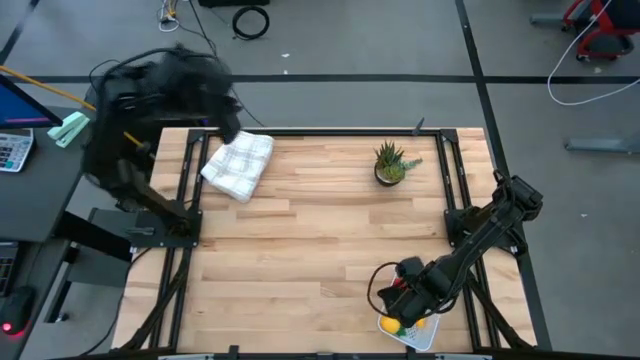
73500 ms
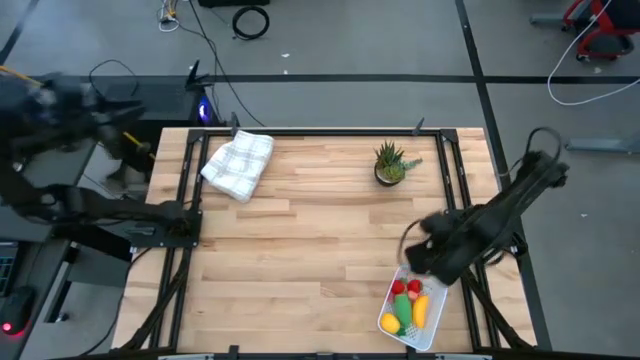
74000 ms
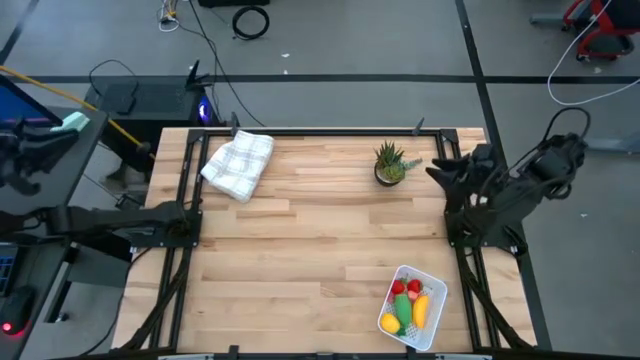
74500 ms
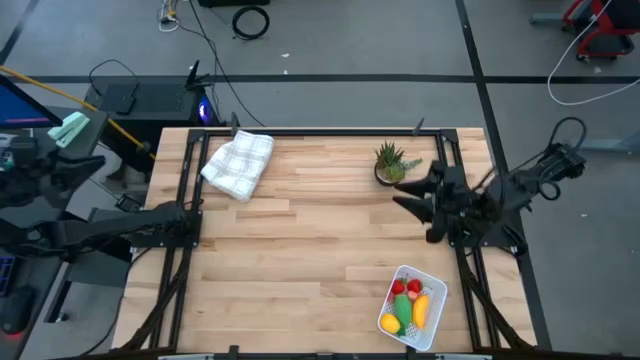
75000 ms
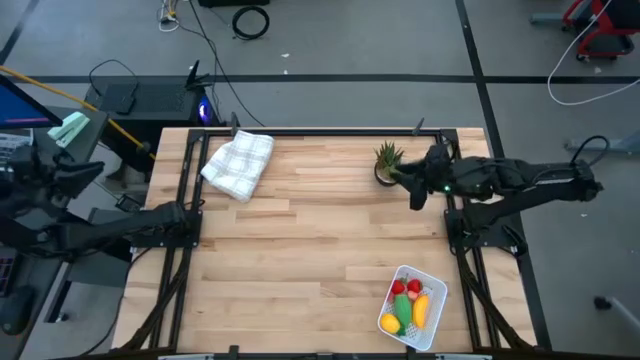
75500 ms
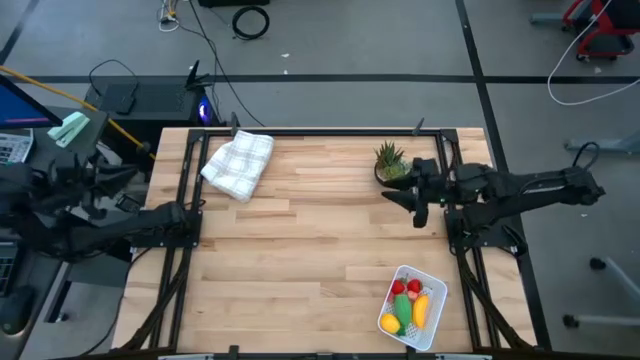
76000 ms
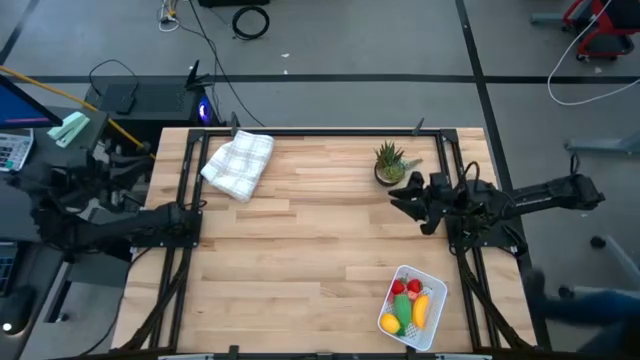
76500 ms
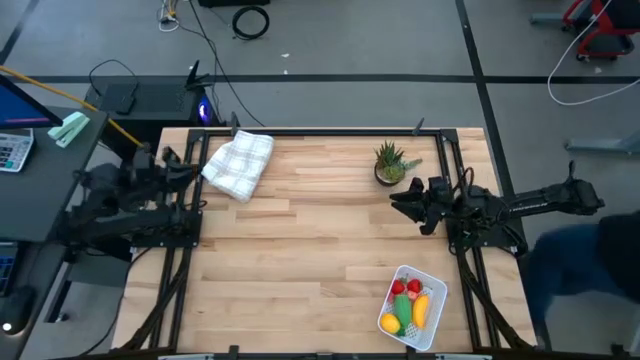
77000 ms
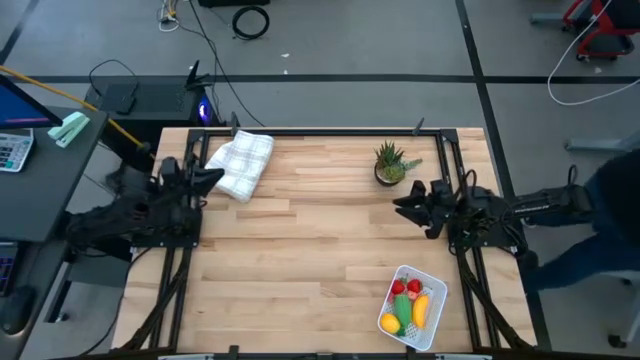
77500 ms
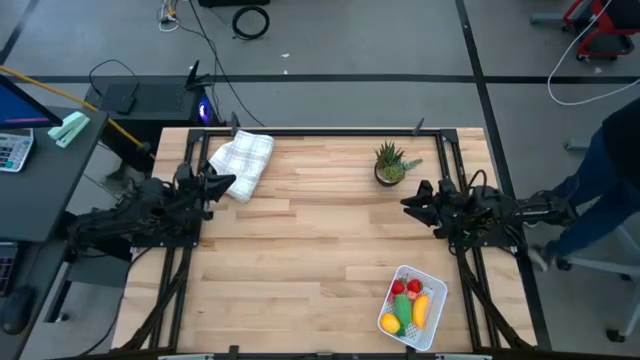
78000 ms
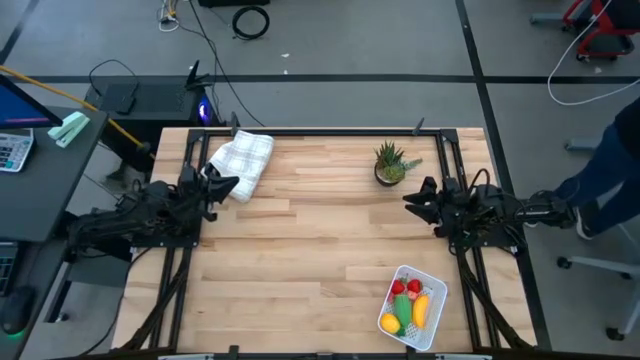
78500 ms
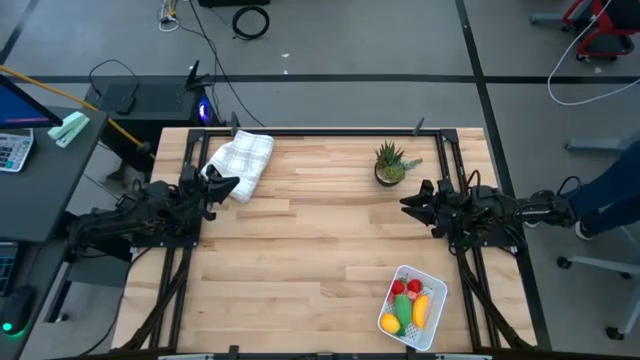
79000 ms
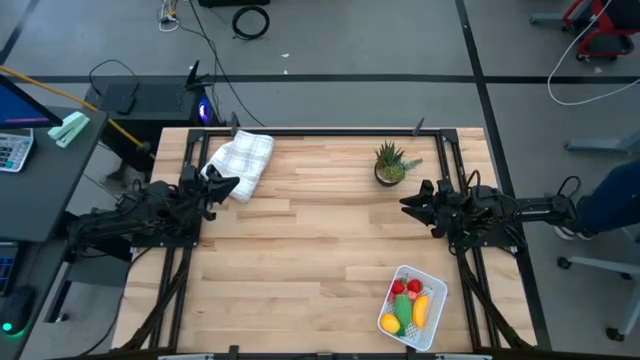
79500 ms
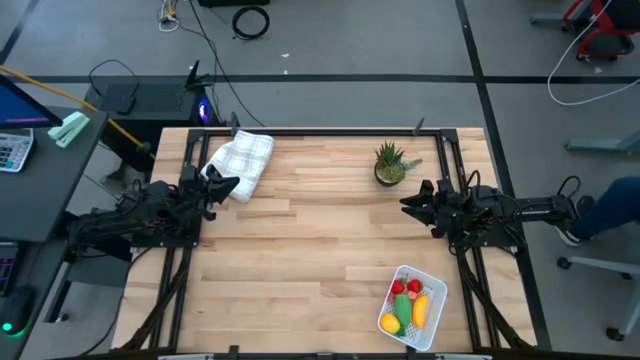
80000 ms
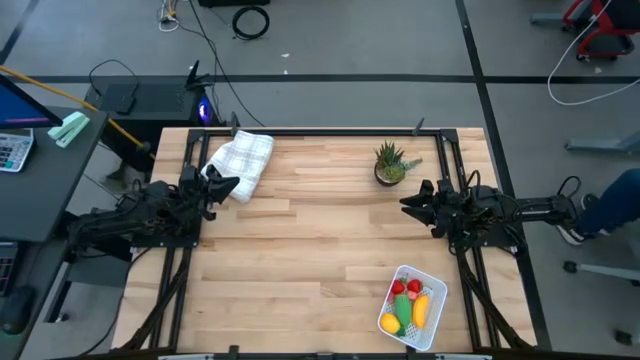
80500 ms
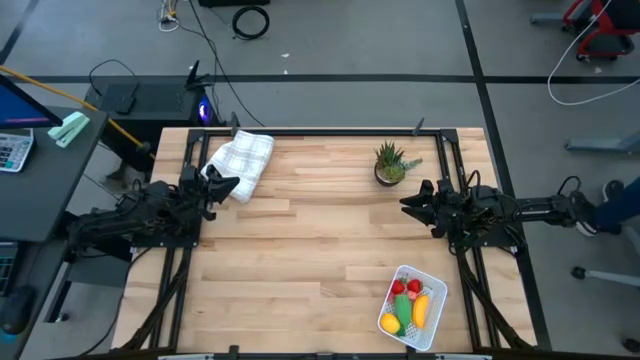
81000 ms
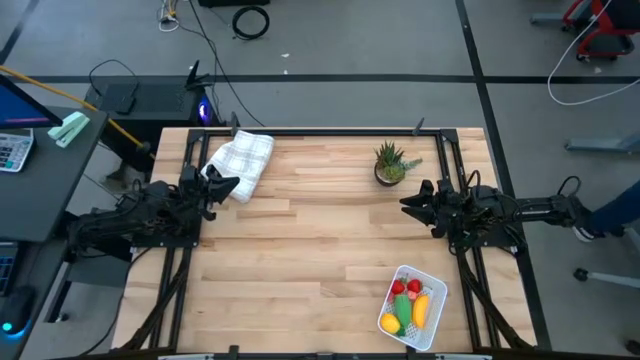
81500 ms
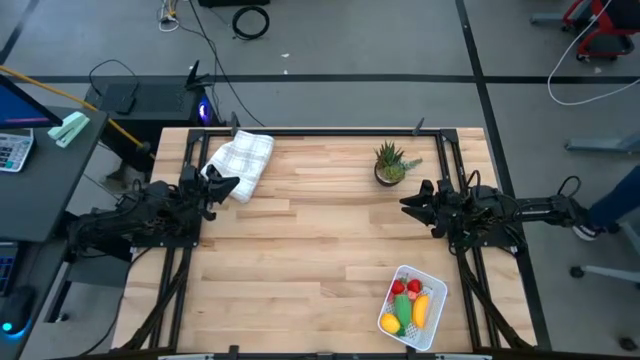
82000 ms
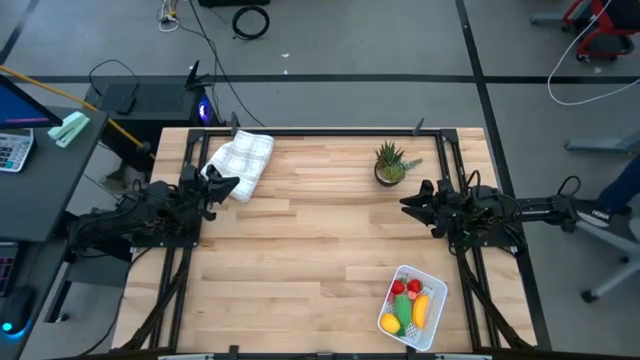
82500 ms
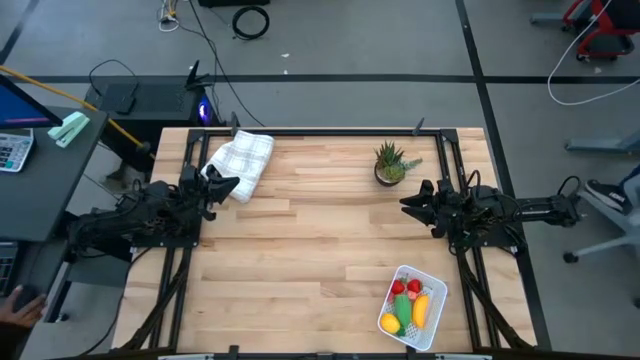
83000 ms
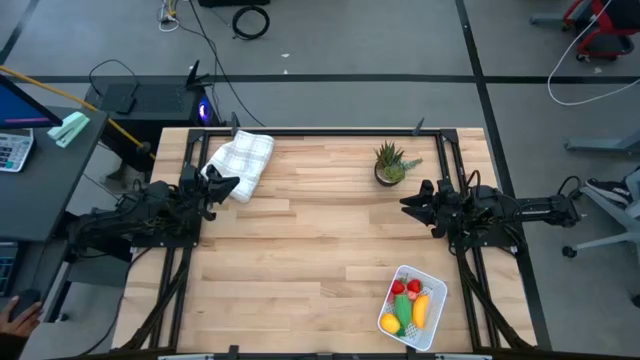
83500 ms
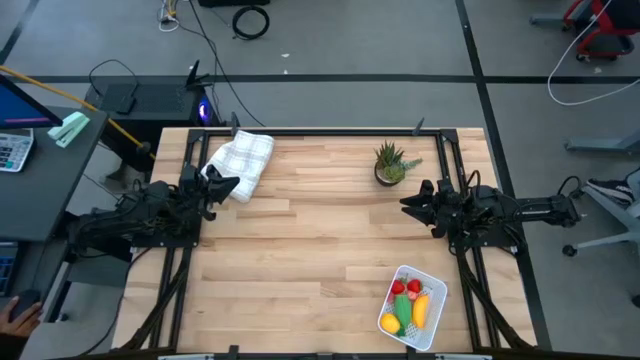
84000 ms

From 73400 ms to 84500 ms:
Task: Pick and placing Produce into tupperware
Return to Home Position

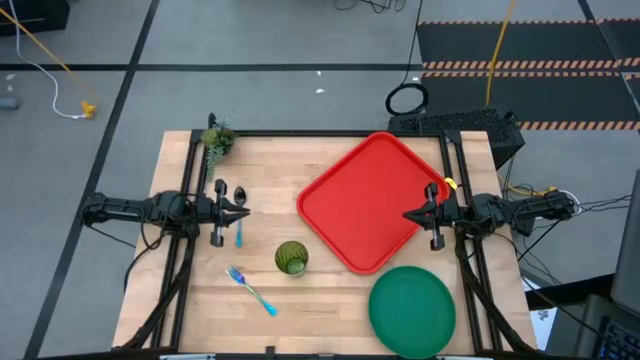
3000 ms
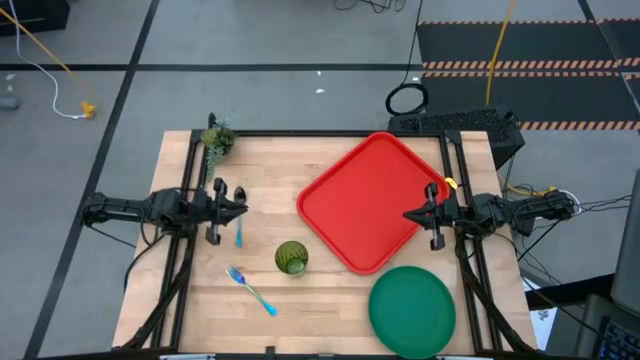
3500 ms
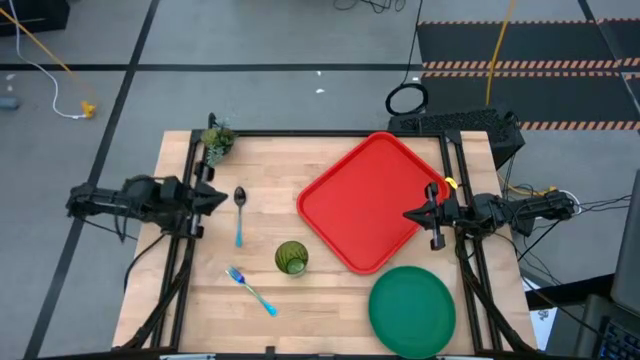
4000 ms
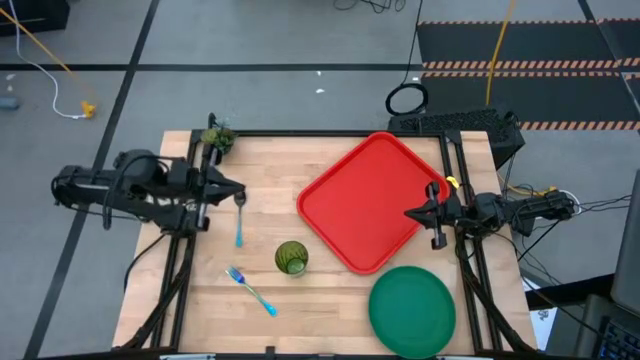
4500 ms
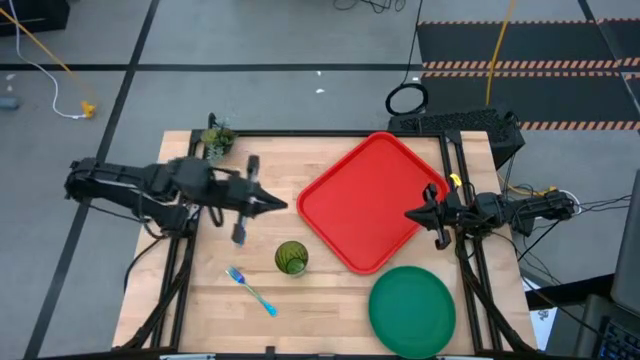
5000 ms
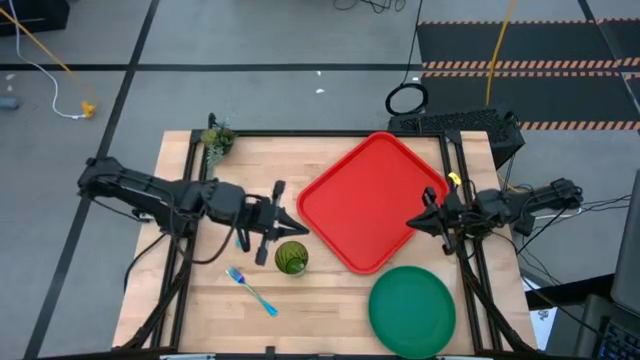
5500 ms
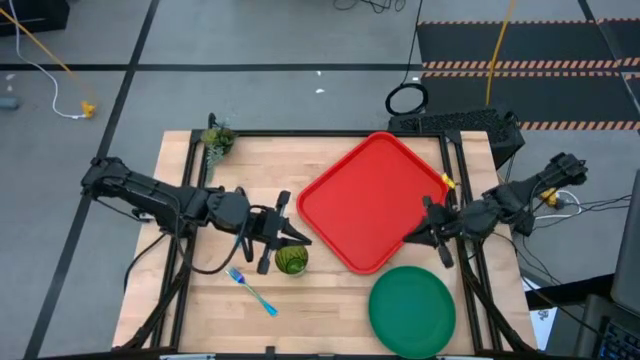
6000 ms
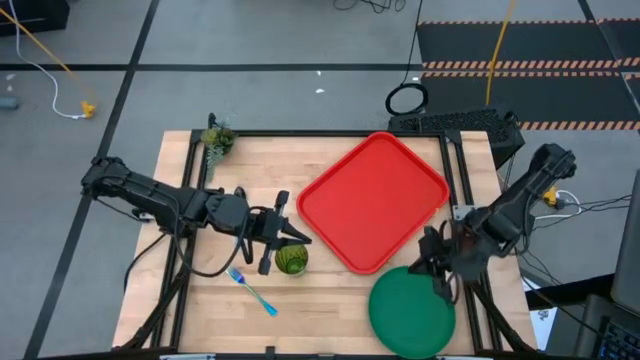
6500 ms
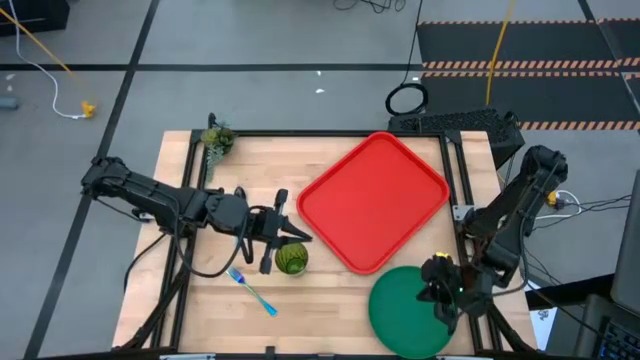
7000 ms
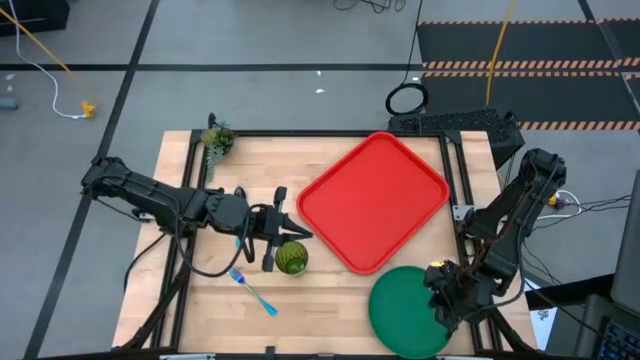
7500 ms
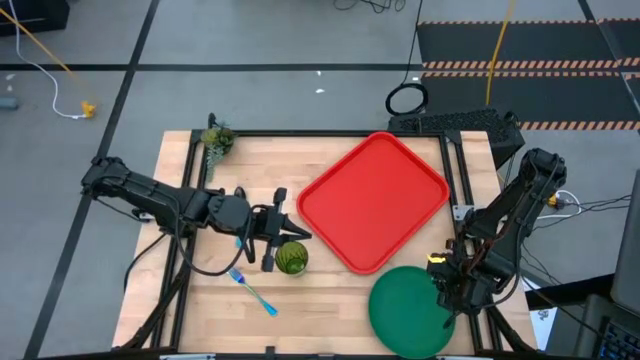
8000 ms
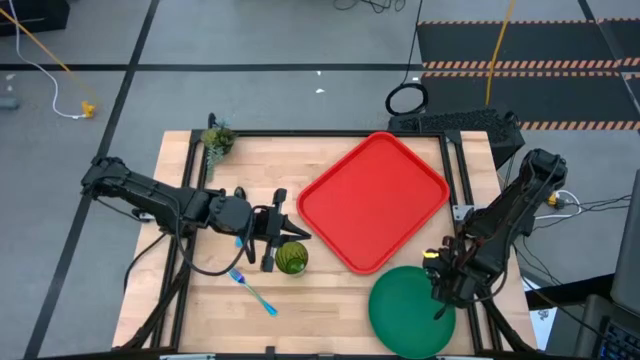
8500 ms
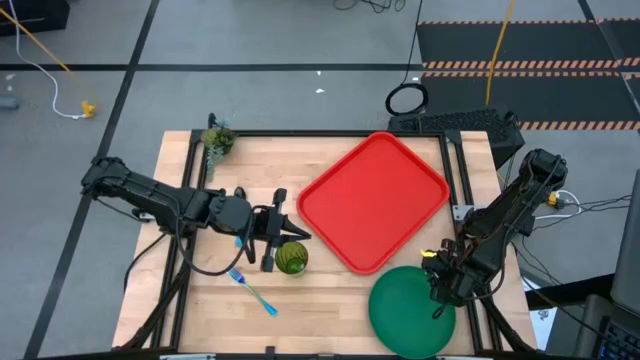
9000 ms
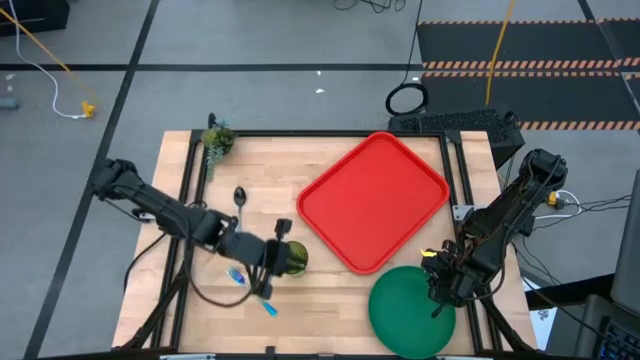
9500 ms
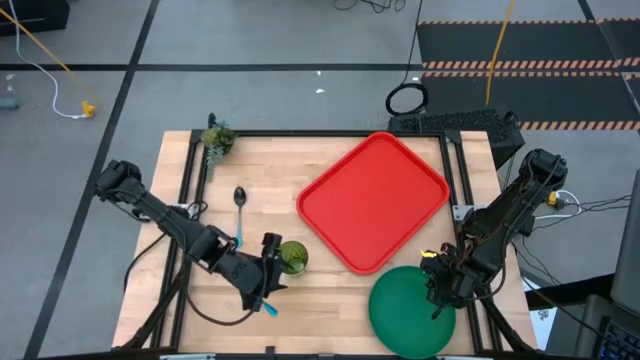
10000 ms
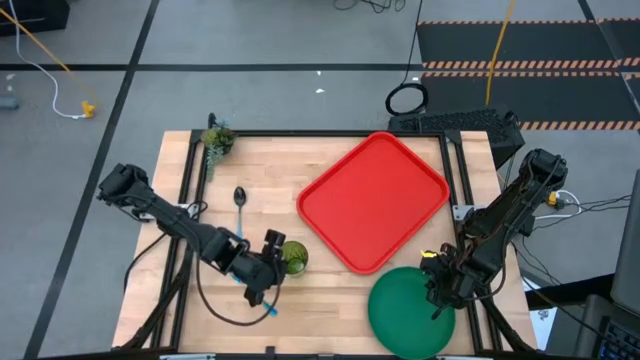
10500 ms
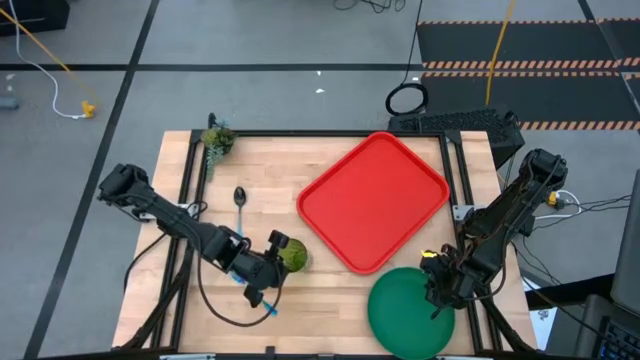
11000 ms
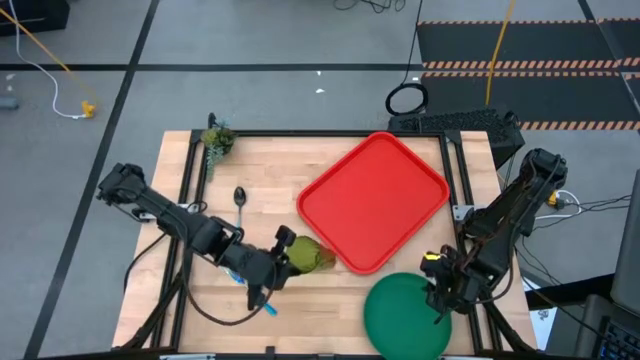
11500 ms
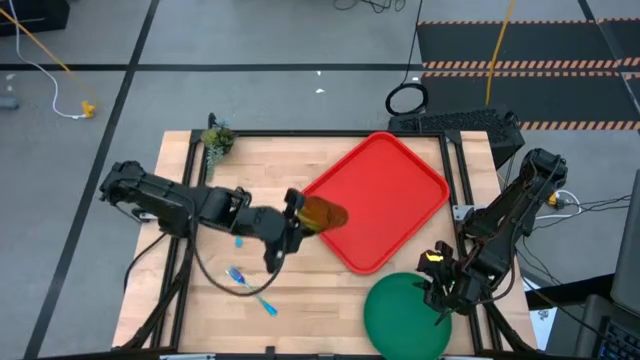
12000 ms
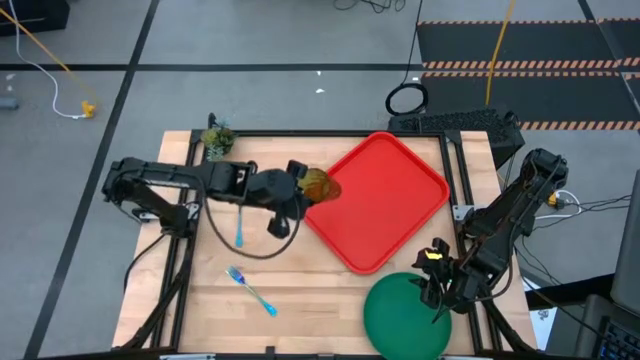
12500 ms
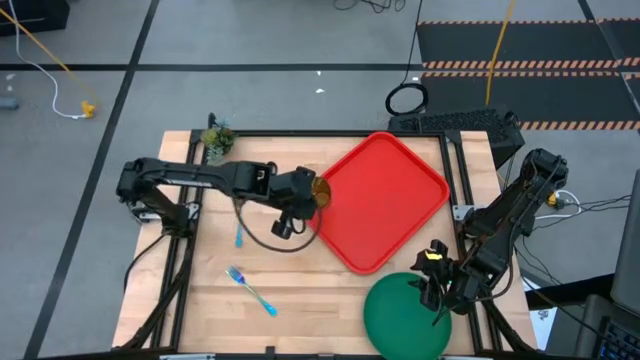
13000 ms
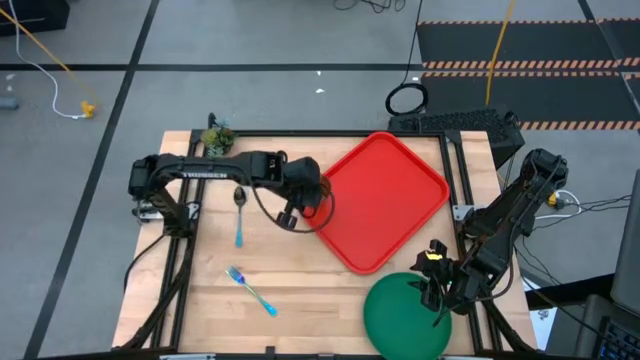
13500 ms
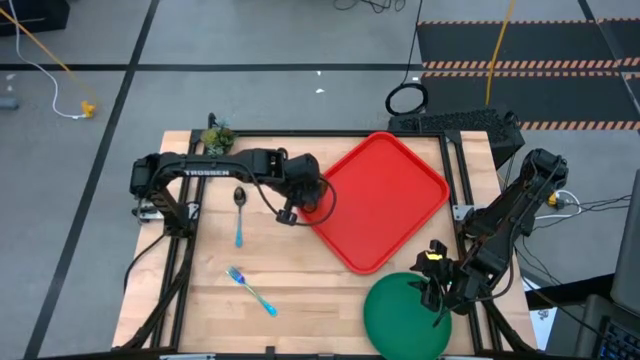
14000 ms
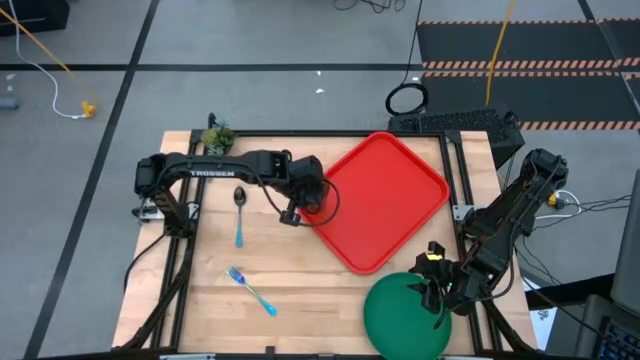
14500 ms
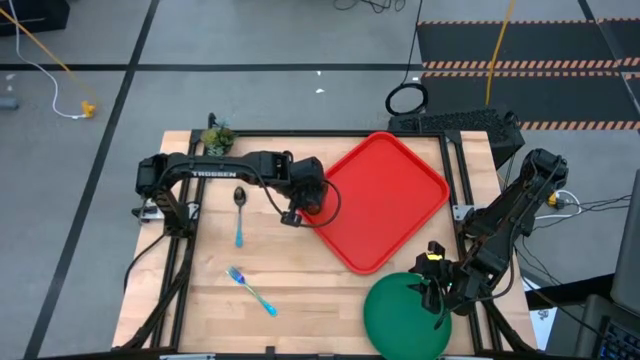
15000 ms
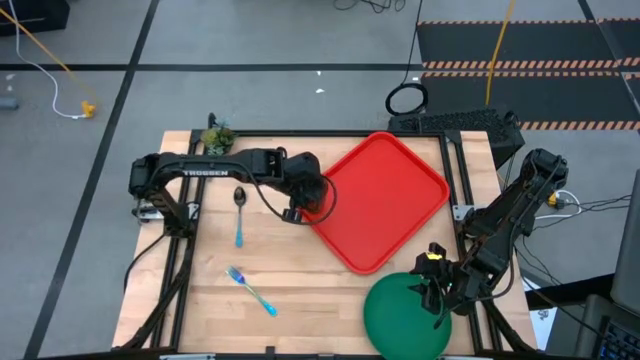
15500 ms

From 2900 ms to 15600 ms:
Task: Pick and place plate/cup/fork/spoon on tray
Put the green cup on top of the red serving tray
